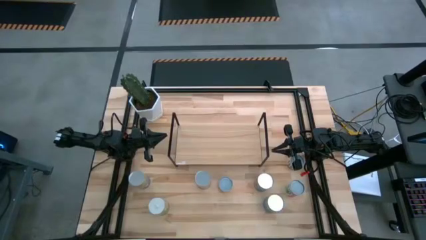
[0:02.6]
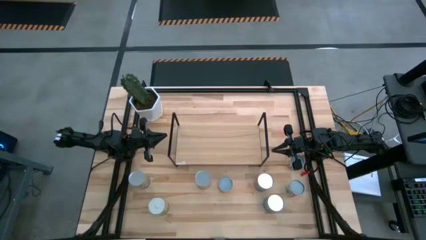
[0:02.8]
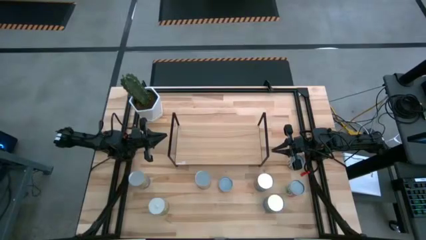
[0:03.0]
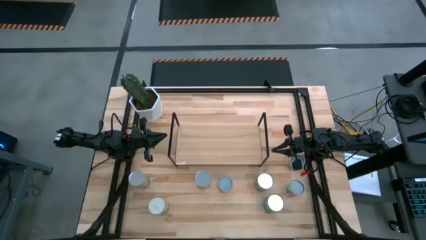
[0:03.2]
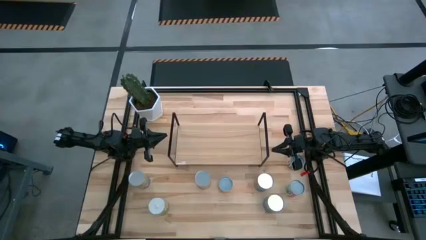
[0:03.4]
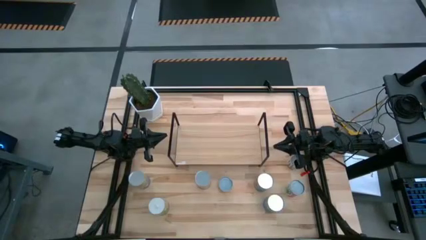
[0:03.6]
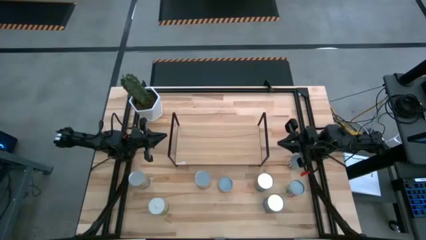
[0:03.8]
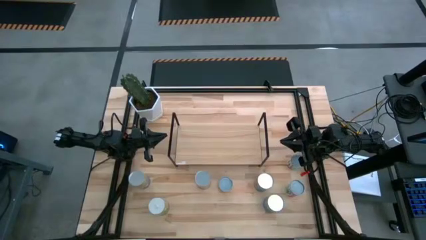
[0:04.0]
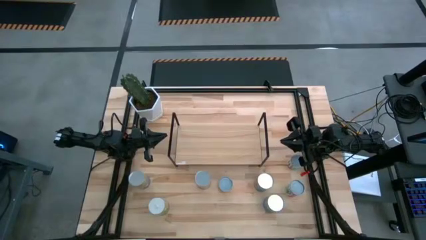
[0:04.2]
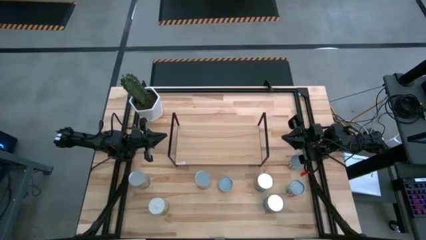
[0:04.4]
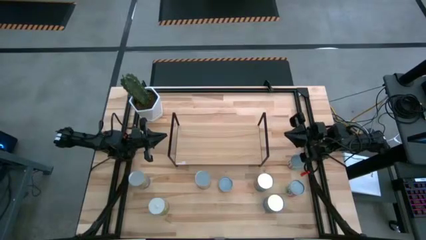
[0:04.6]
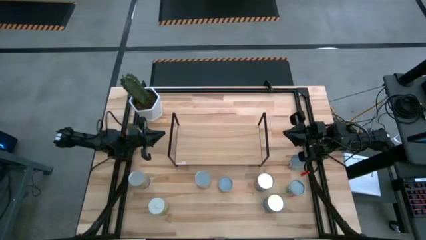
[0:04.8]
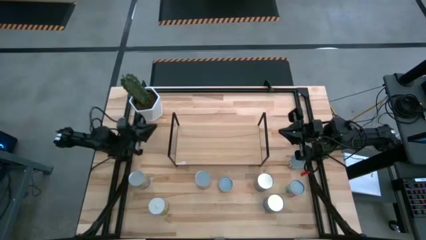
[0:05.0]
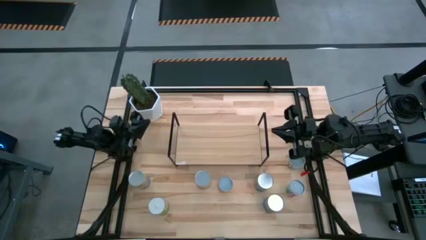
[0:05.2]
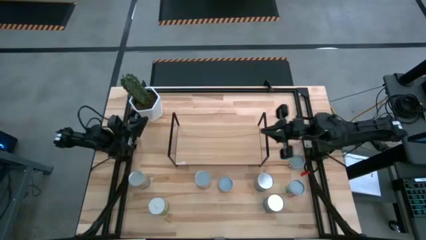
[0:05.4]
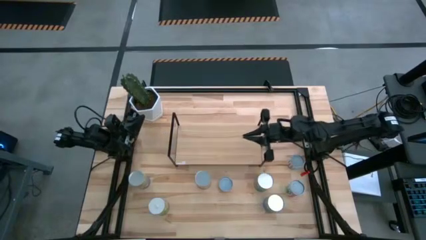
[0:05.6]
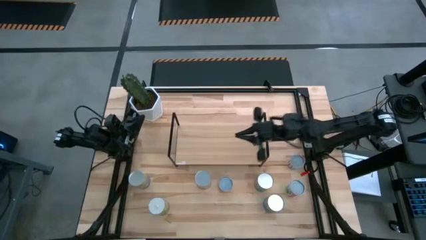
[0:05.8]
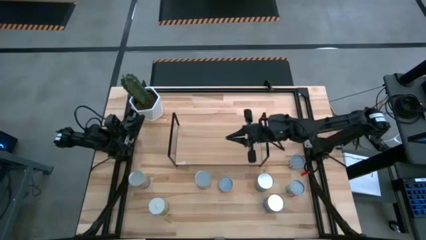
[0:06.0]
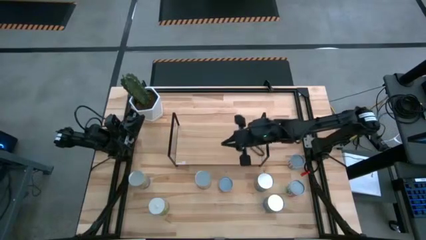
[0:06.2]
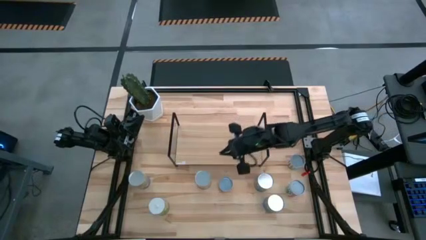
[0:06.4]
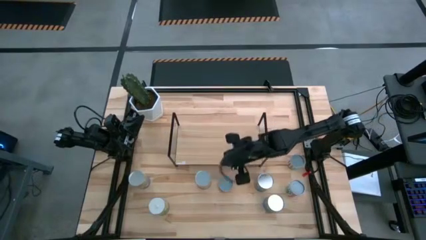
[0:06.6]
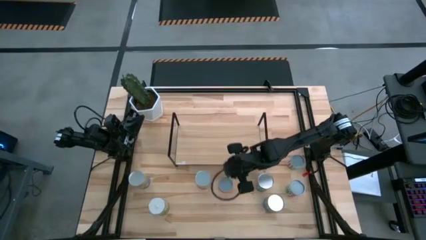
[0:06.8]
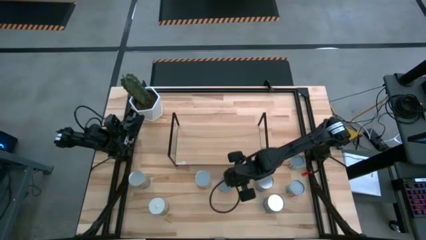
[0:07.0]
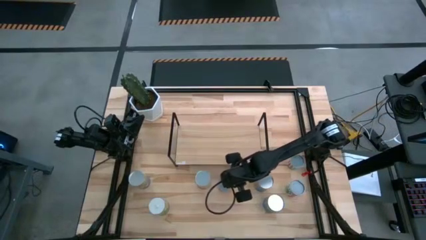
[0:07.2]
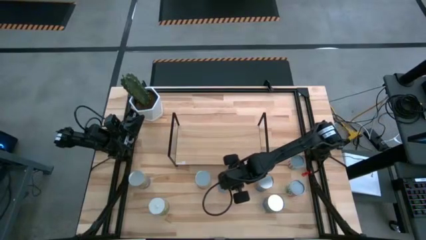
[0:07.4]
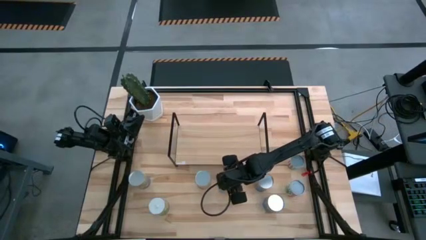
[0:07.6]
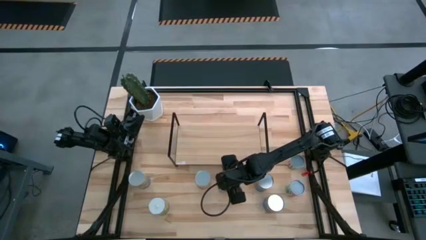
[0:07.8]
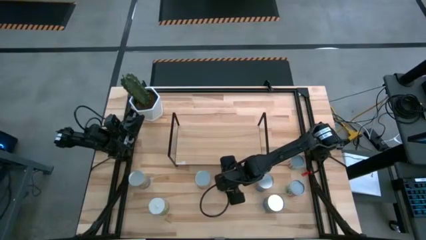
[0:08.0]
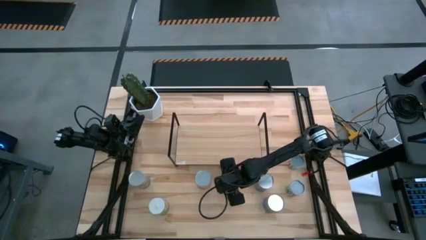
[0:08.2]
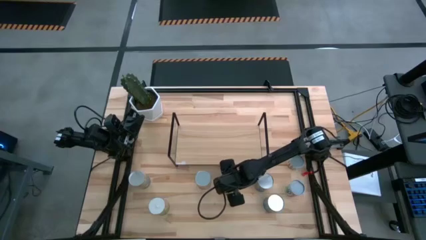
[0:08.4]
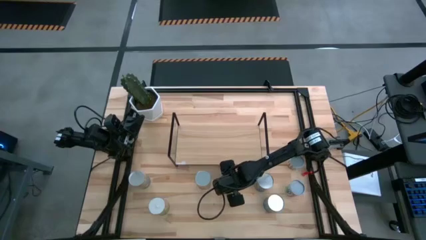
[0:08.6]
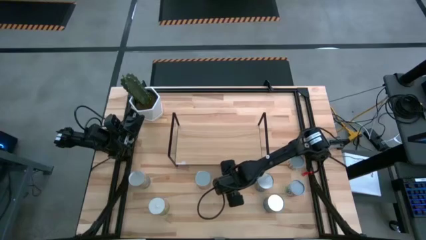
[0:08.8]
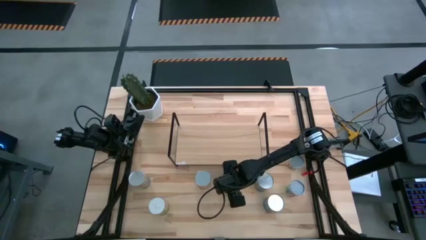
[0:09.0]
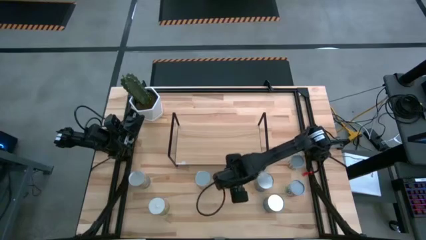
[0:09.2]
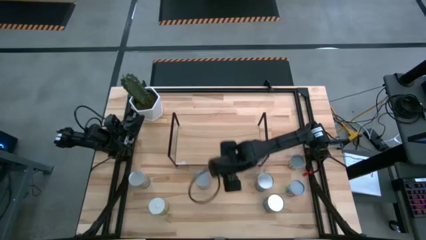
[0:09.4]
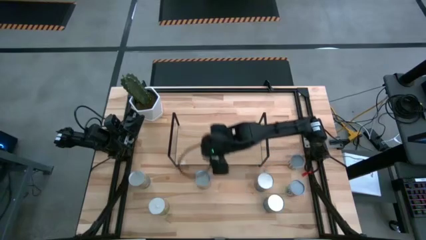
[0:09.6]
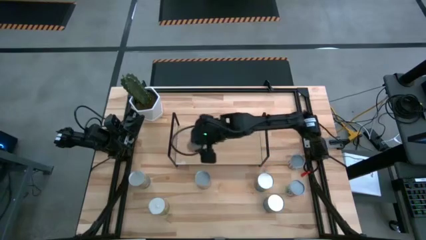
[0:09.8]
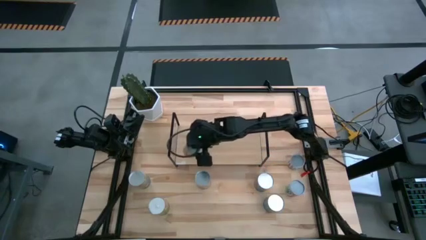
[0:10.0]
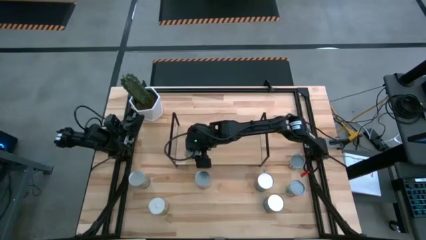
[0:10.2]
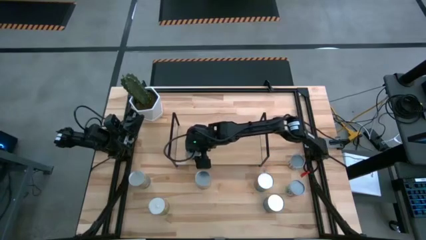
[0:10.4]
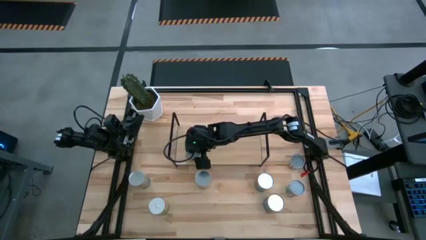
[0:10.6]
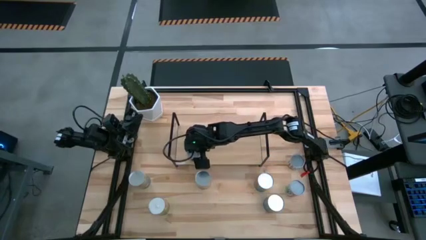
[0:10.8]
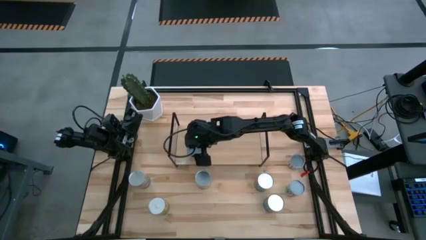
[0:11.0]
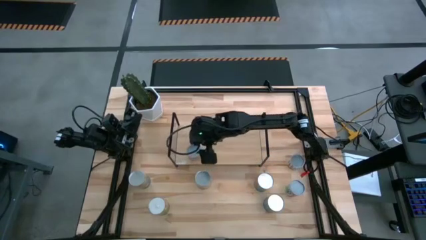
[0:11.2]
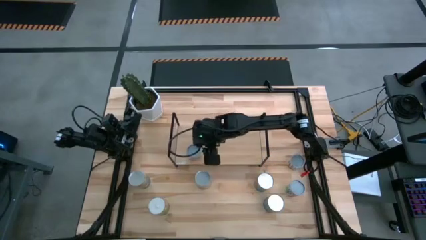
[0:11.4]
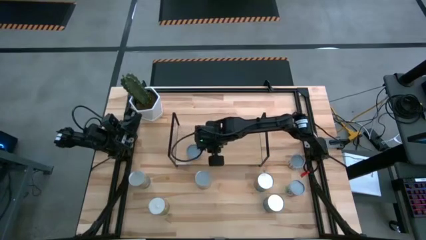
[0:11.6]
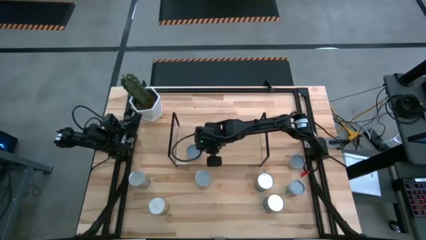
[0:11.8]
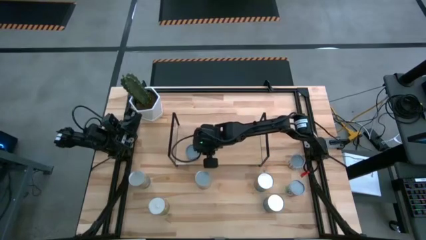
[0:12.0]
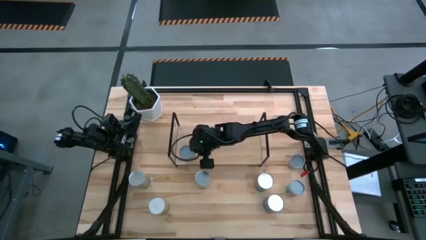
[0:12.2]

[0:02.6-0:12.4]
Task: Pick and place cans onto a shelf
Put the small canned oranges on the shelf

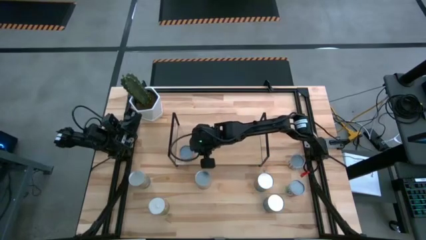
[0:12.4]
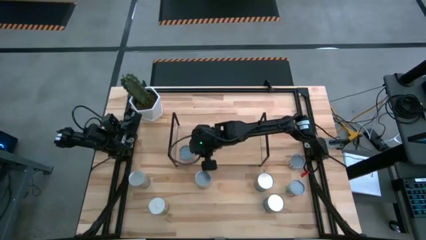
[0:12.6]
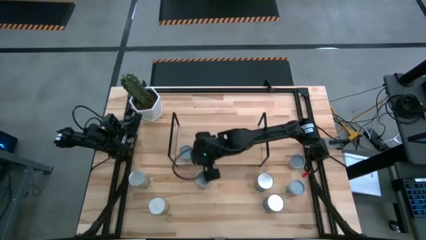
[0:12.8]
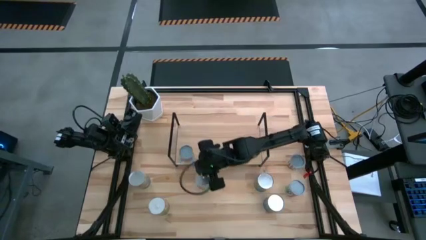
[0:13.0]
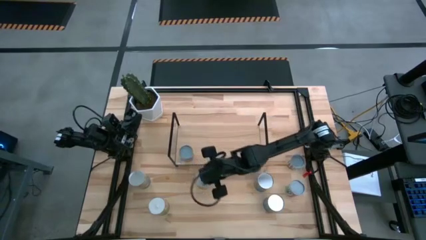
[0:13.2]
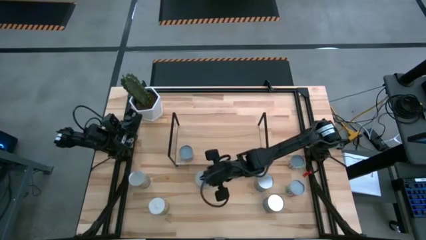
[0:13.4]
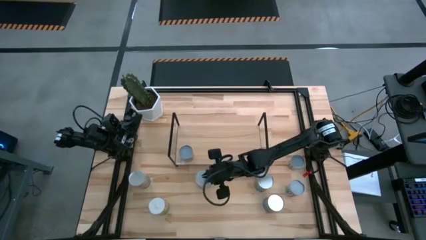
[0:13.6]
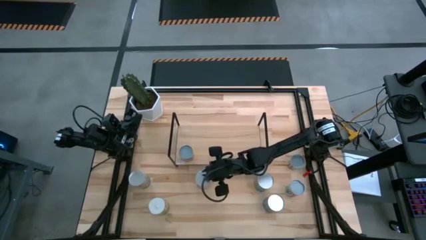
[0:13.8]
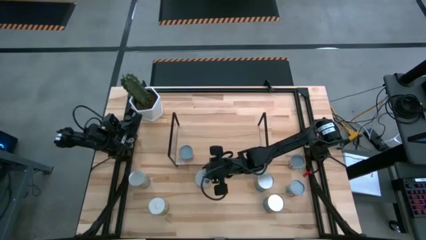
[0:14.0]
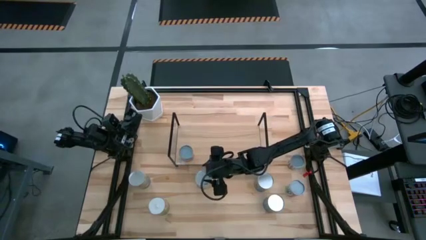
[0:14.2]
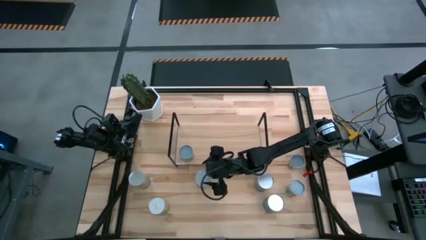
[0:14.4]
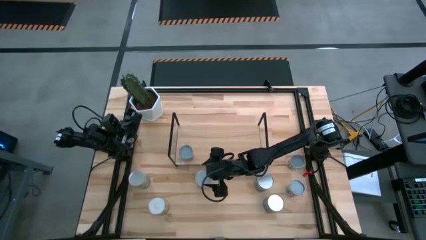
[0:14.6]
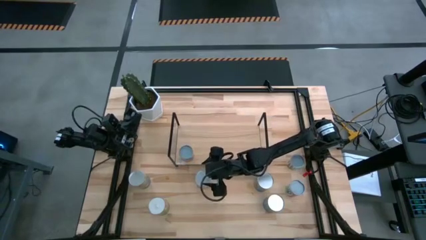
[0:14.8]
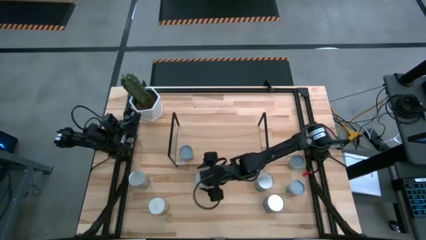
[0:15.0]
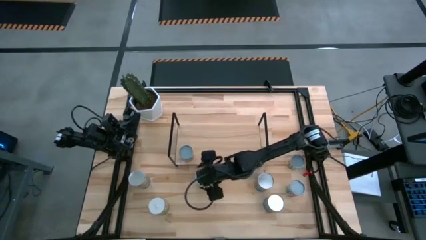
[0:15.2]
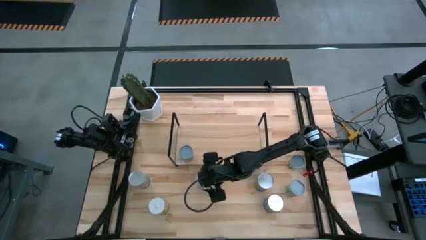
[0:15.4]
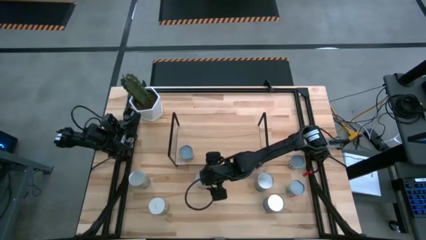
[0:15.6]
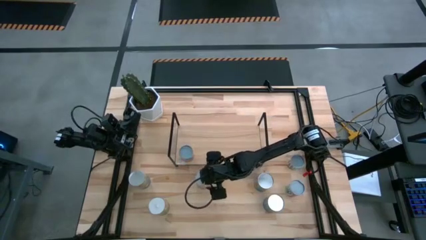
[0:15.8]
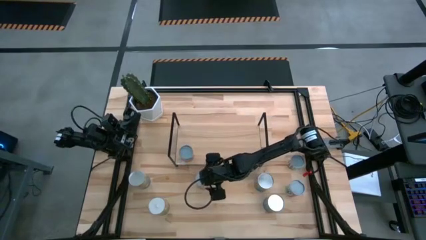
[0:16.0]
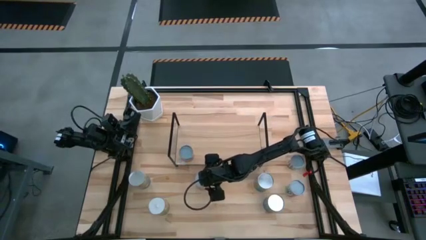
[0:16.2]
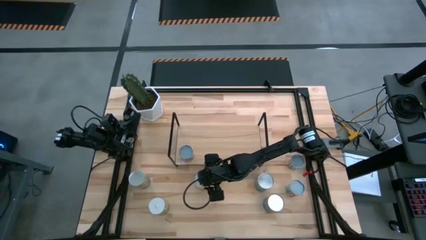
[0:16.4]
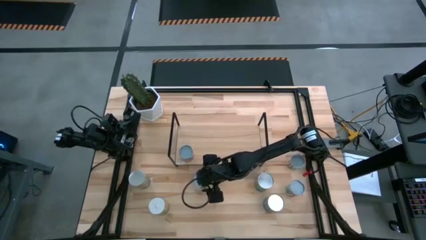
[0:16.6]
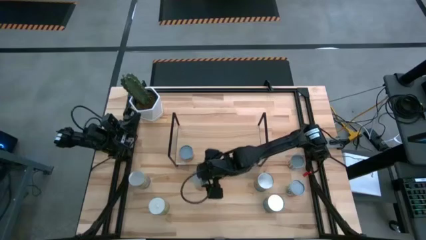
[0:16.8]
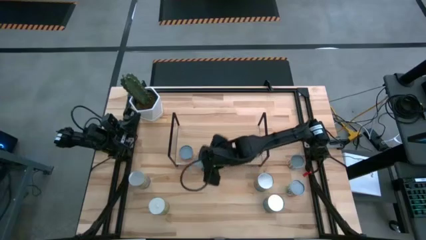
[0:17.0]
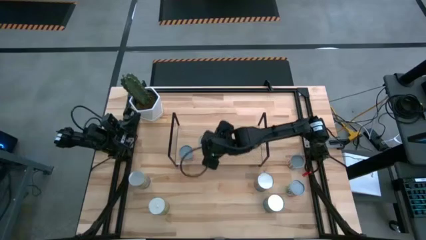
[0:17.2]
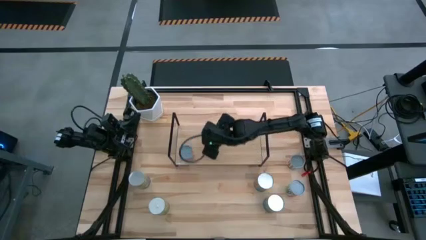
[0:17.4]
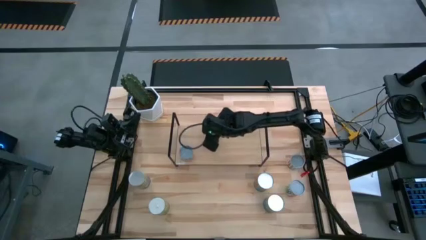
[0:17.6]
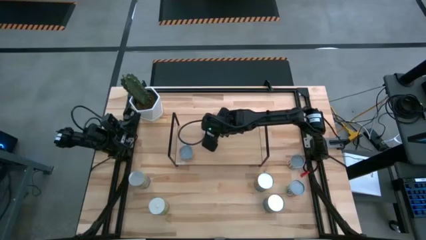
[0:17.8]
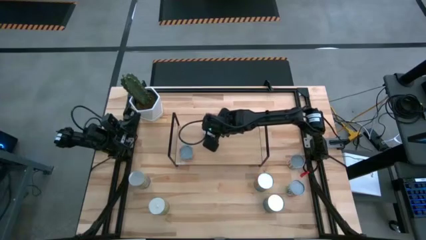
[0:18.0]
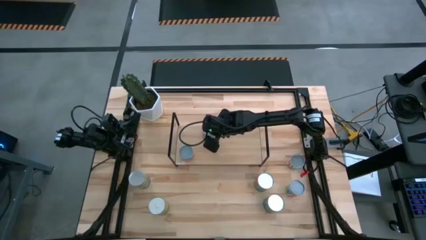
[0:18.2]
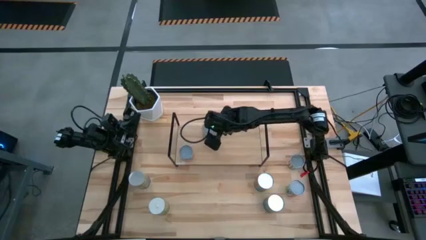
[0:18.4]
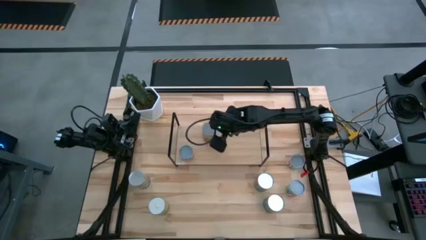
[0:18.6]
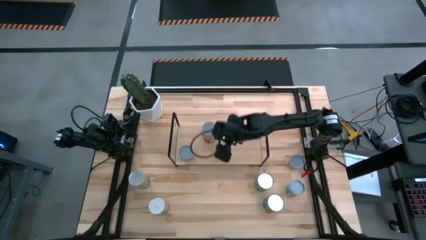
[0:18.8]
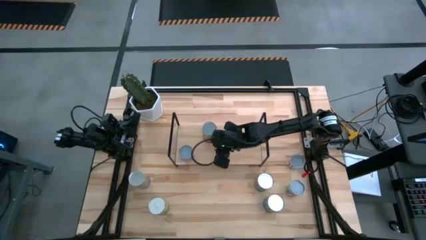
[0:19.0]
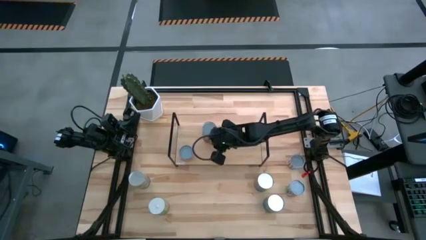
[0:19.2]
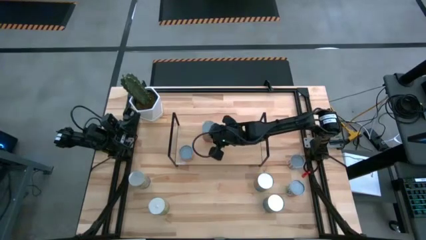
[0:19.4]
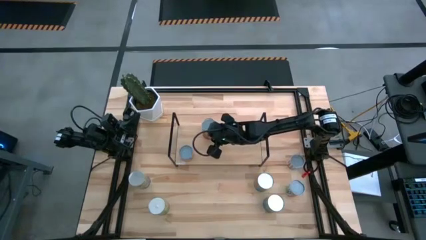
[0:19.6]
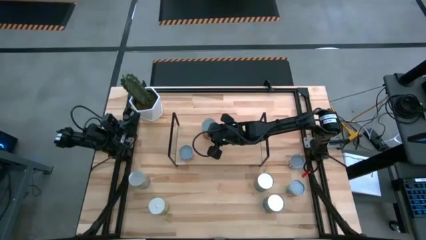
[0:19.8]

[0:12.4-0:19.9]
Put the canned pineapples on the shelf
